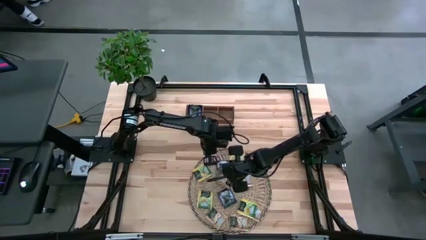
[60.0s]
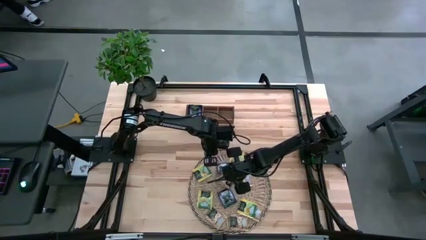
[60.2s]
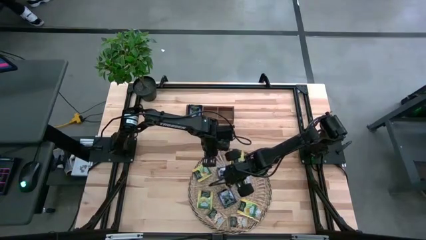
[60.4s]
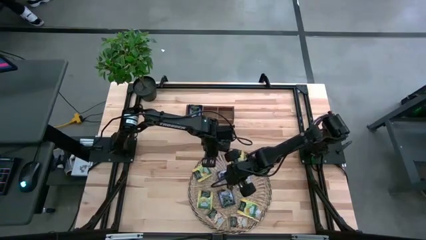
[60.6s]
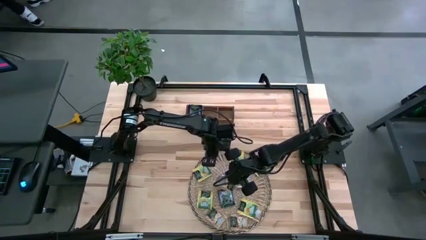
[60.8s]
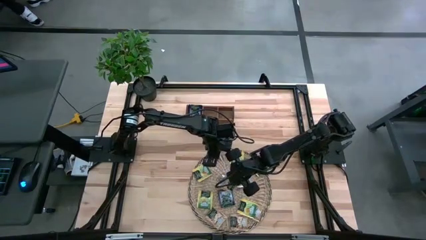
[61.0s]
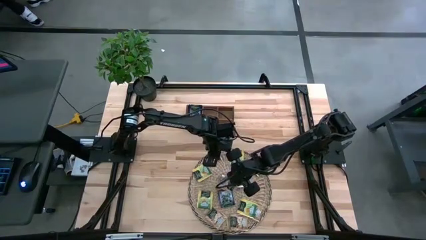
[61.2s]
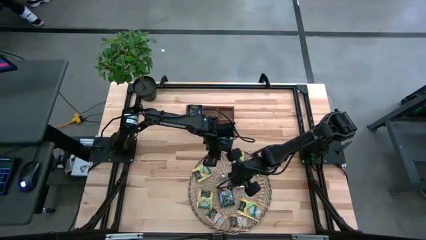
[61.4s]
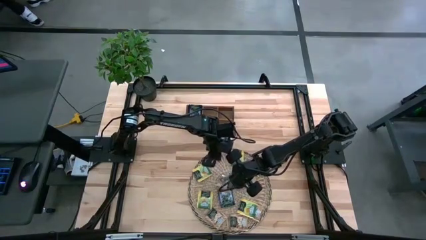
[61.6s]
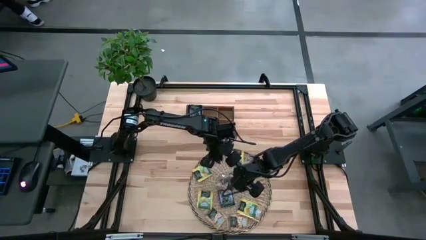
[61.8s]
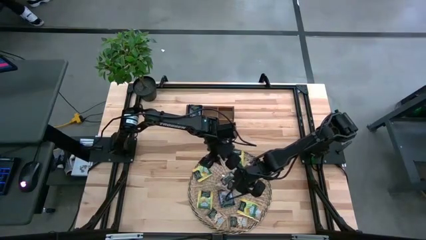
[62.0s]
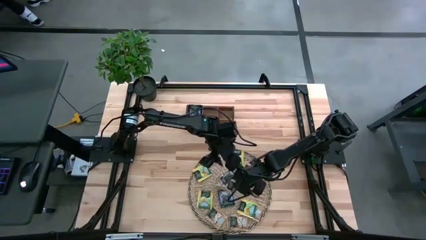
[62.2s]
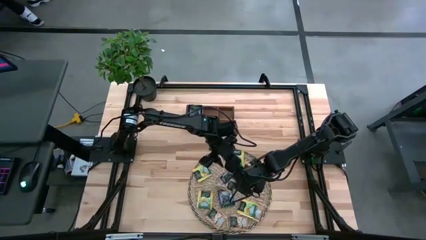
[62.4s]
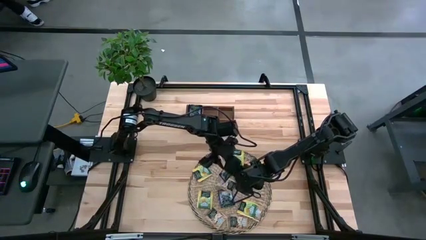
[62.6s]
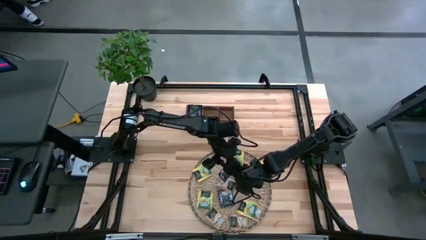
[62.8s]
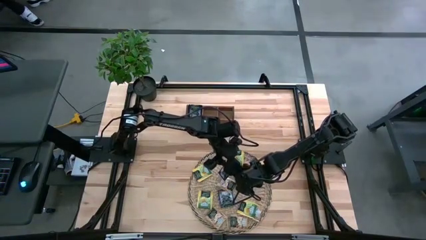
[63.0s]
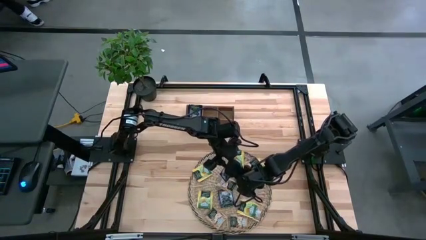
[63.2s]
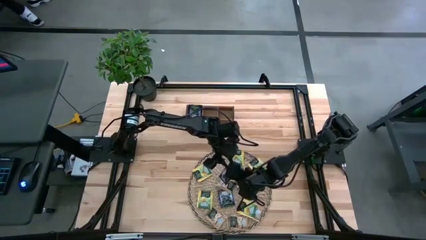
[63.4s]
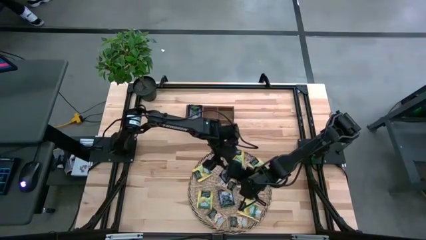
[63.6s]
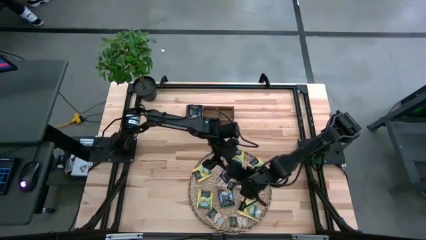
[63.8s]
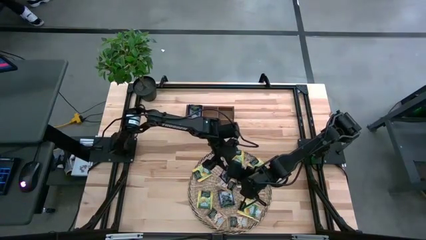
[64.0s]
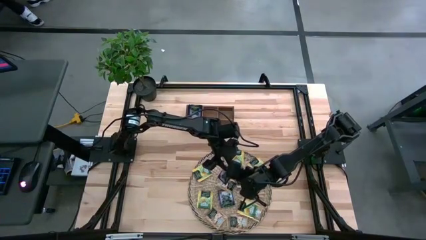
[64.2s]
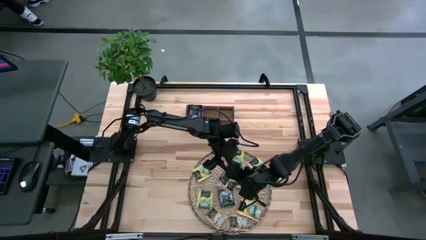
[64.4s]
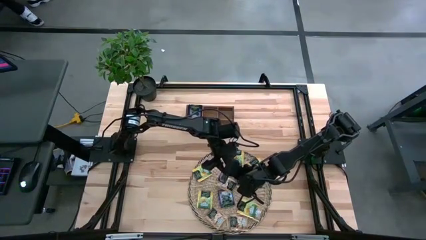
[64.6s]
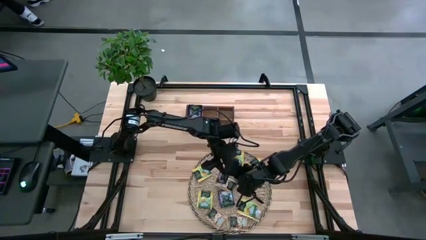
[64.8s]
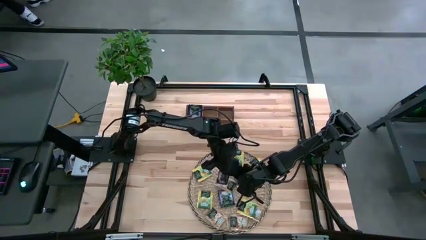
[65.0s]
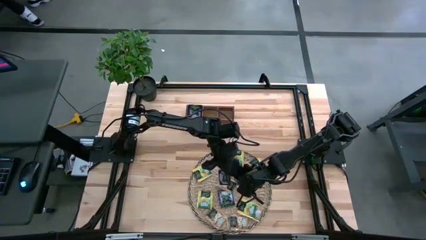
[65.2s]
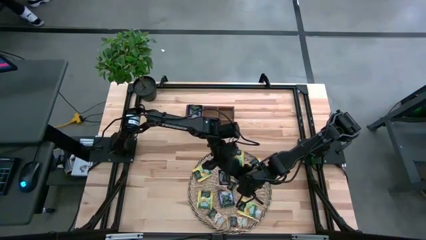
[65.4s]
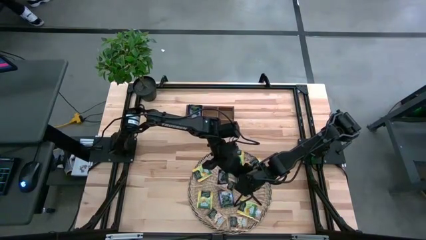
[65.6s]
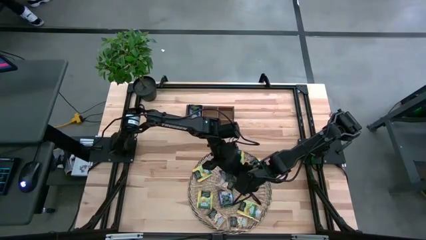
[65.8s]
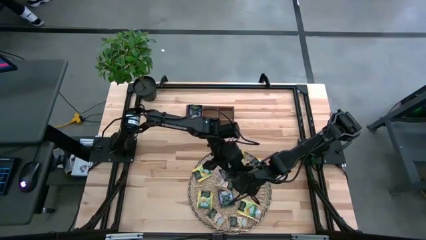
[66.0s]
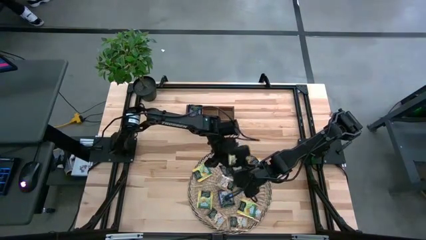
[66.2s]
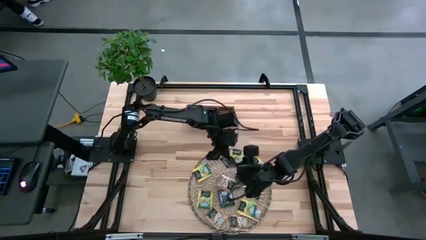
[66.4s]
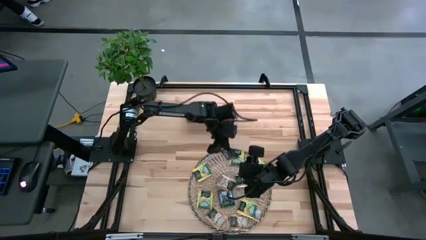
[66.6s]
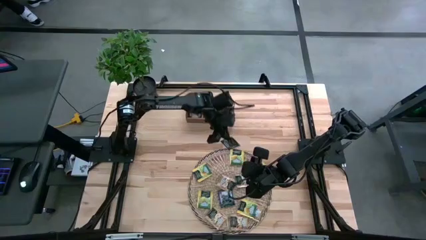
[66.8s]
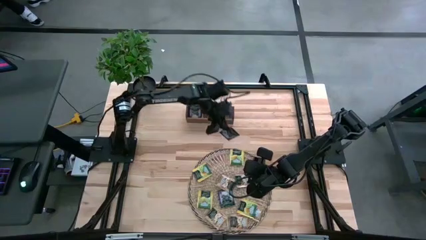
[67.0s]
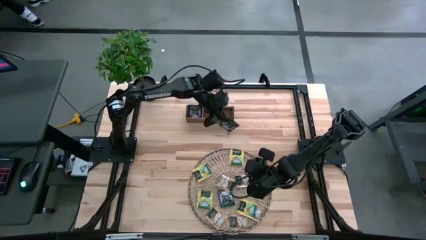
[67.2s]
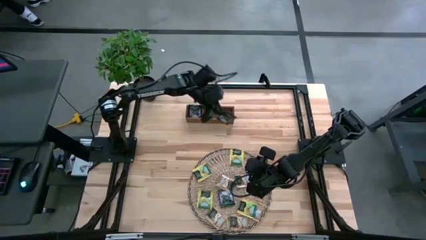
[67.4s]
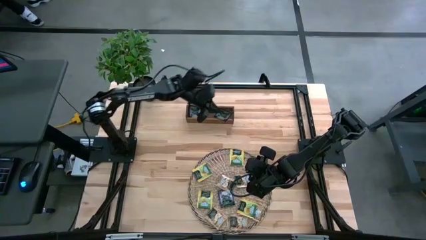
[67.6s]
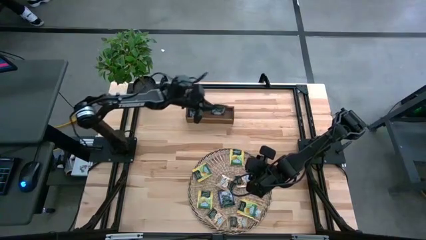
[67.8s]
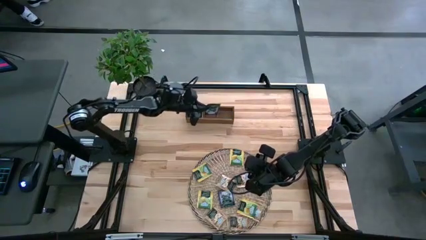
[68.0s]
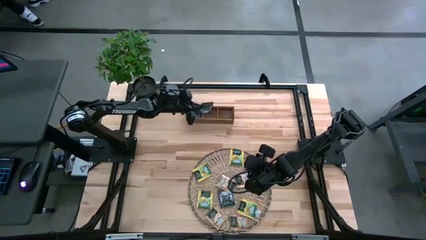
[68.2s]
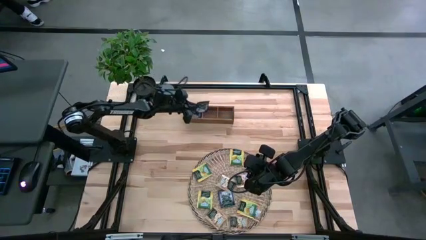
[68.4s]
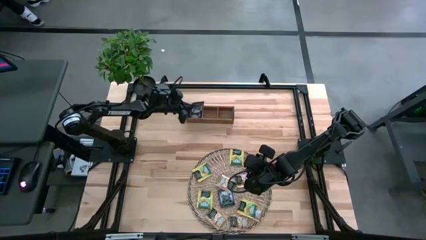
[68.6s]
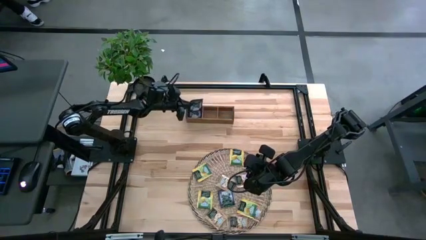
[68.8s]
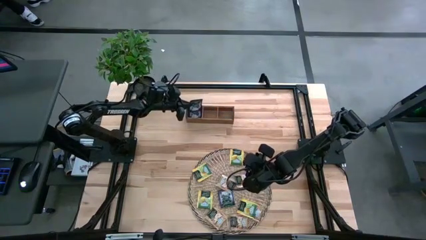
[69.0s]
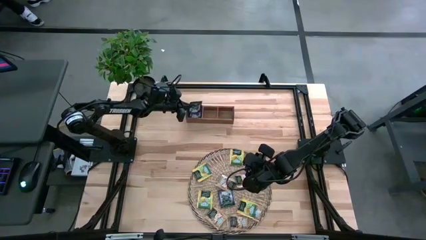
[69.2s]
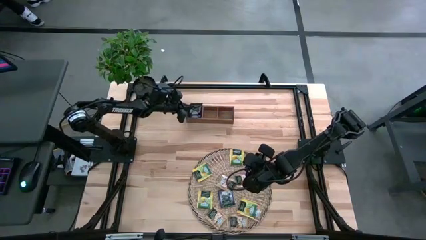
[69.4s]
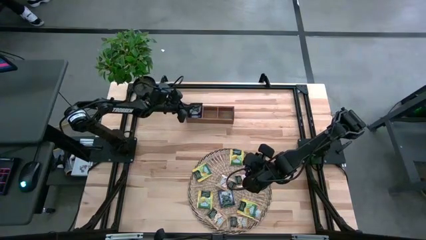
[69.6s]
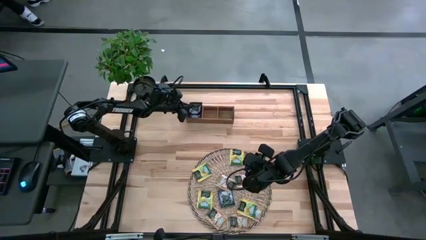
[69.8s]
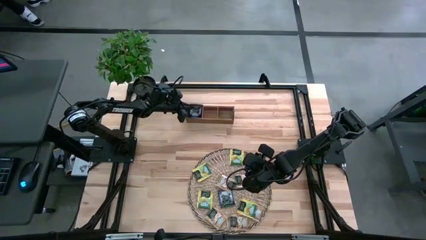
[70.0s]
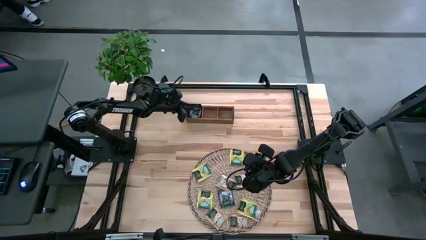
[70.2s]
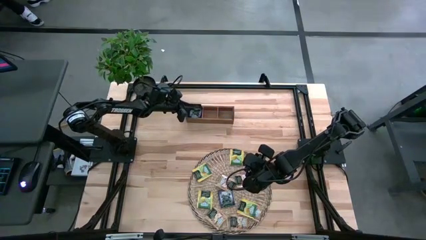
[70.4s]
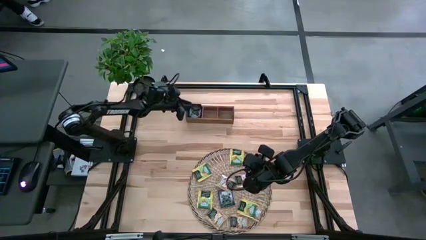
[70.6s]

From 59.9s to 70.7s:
Task: Pick & Place Tea
Put the purple tea bag in the left section of the wooden organizer

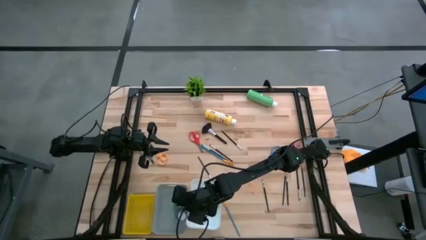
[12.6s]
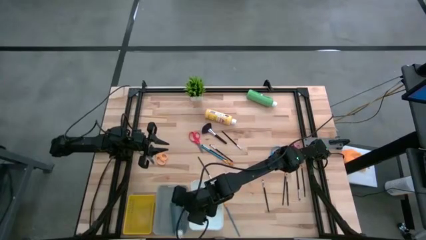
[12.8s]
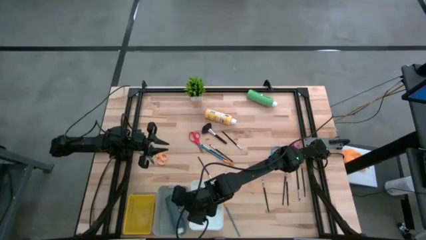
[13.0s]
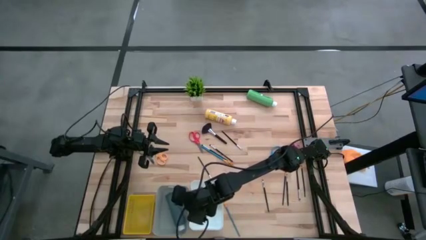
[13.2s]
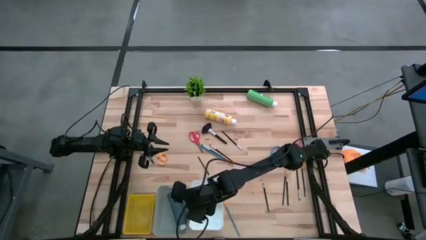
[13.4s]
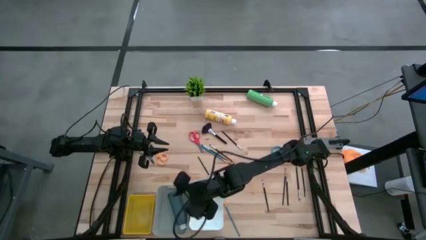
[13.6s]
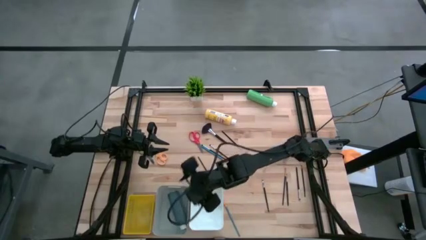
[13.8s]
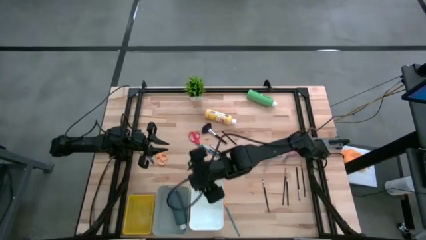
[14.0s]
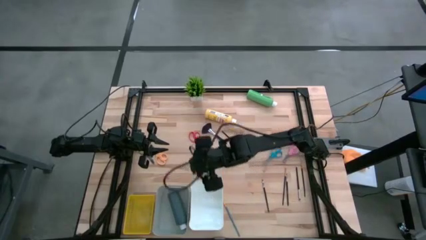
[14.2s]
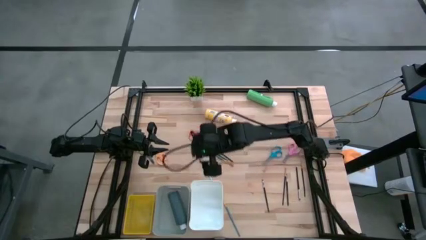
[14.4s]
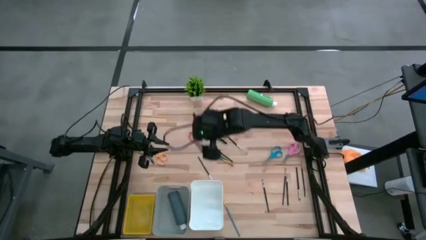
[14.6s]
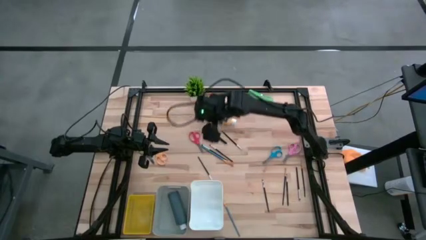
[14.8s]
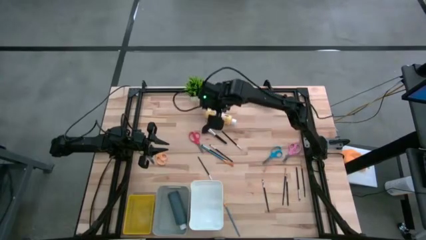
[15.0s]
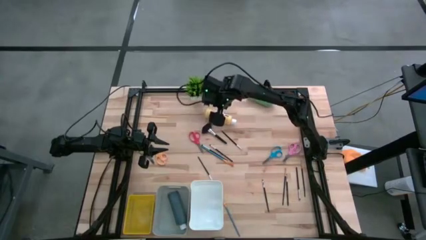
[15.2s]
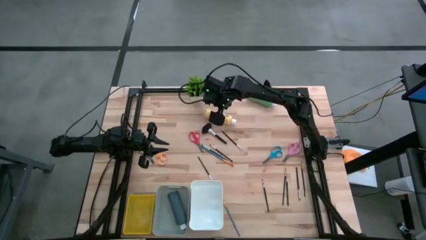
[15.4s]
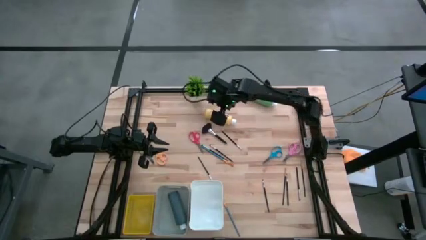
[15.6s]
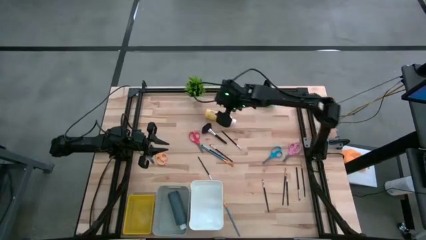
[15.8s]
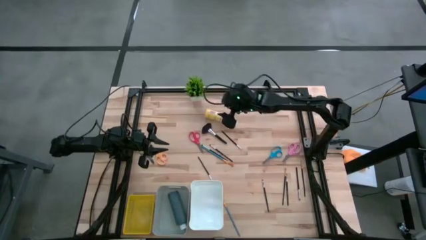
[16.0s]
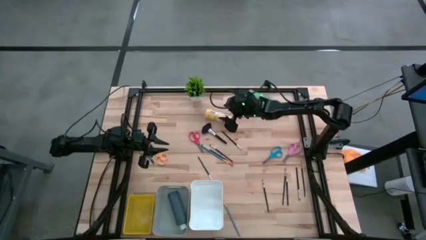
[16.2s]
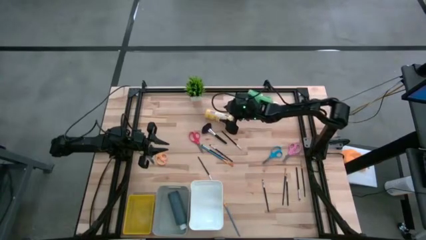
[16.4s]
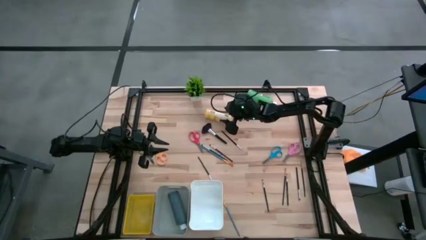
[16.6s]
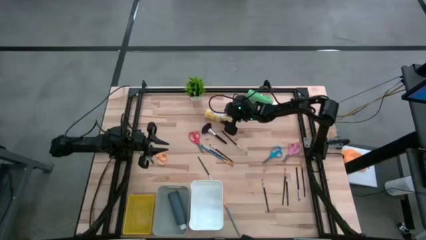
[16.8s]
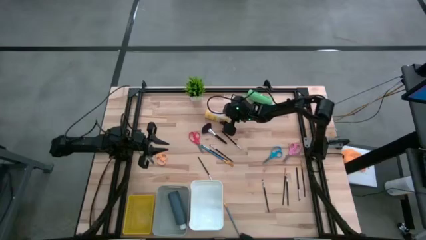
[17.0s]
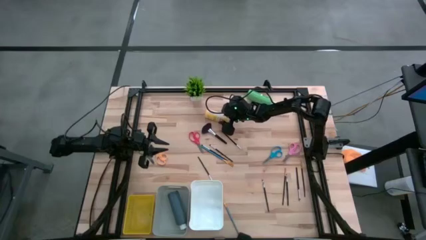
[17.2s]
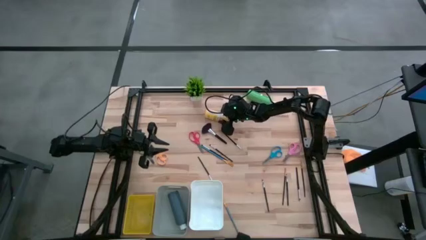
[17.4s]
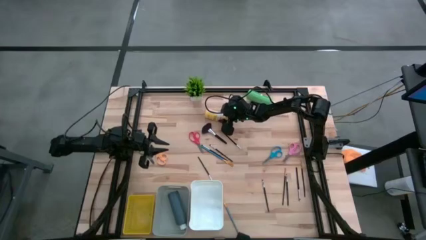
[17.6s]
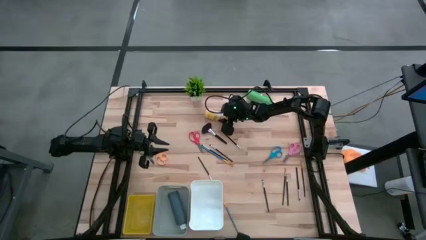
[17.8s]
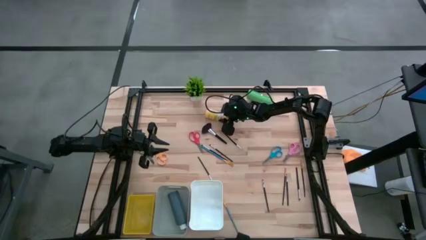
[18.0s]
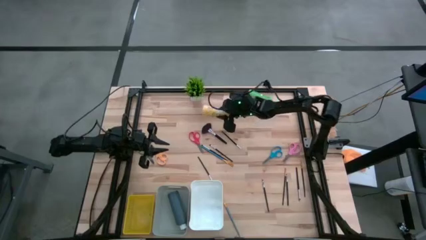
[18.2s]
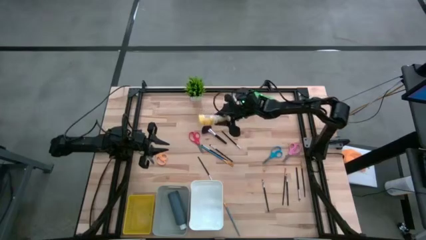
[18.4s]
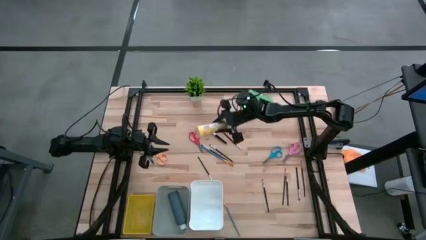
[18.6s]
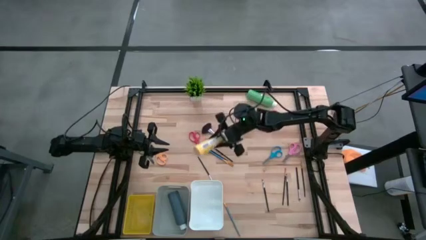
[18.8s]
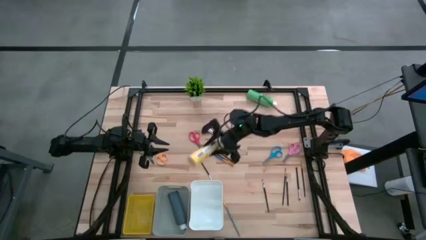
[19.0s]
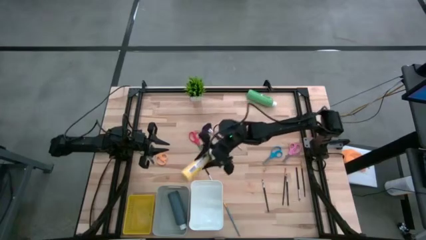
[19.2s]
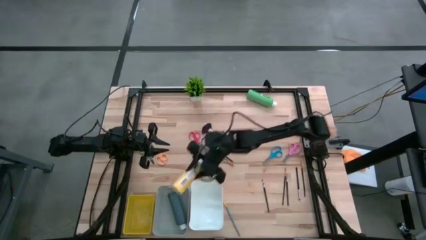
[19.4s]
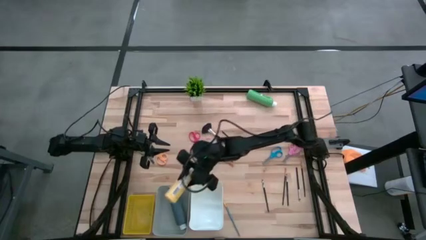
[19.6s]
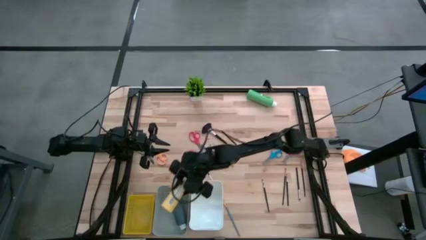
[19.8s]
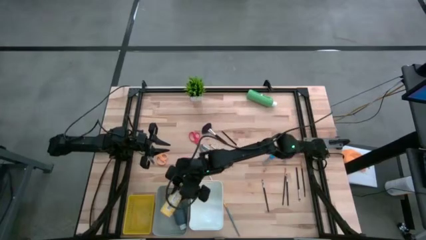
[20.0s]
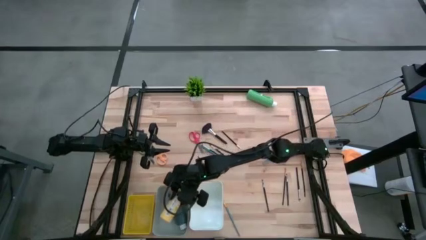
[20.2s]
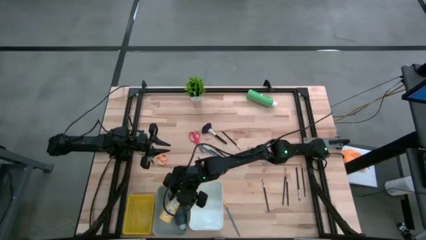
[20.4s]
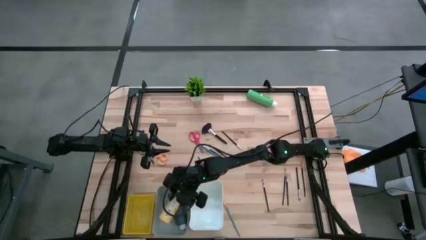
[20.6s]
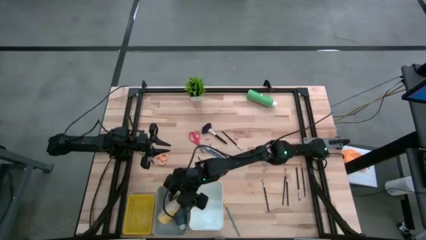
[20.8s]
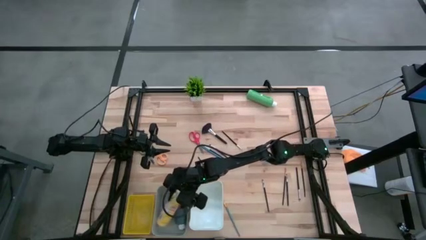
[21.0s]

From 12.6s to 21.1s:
Task: Pick & Place Paint Supplies
Put the yellow paint bottle into the gray bin
